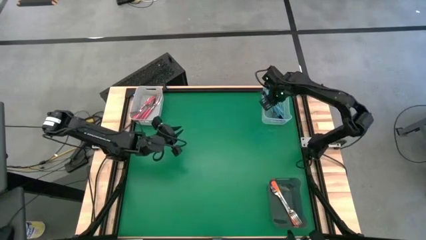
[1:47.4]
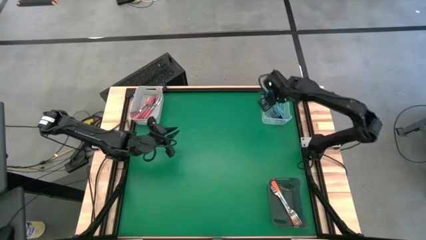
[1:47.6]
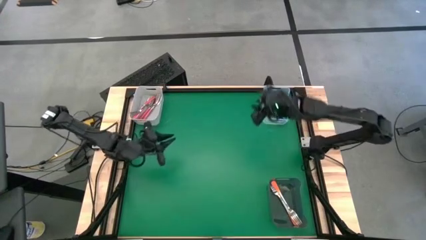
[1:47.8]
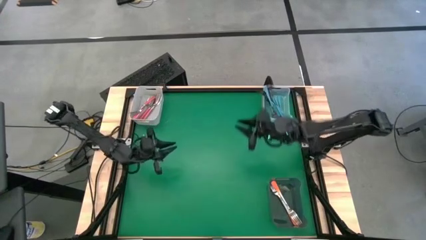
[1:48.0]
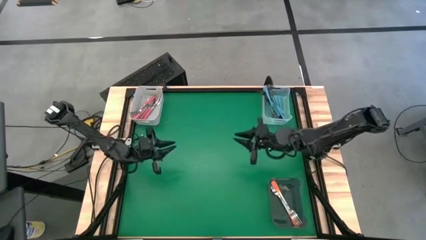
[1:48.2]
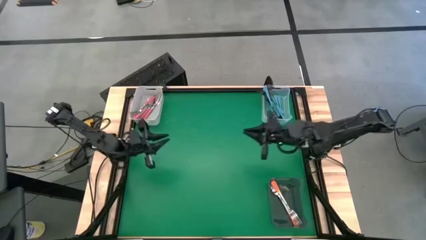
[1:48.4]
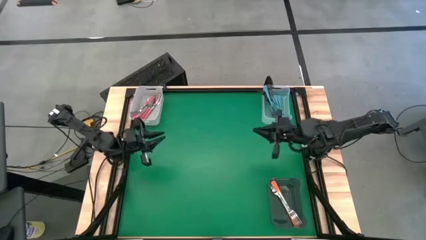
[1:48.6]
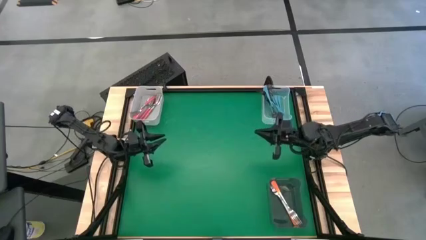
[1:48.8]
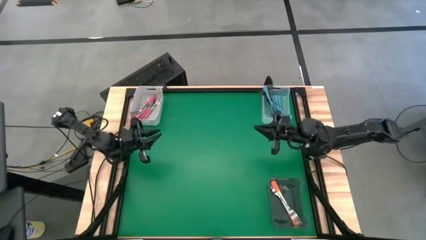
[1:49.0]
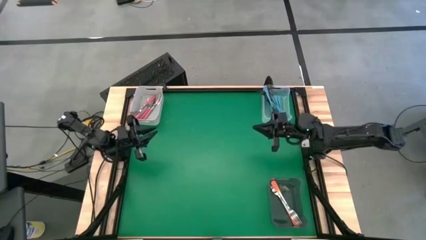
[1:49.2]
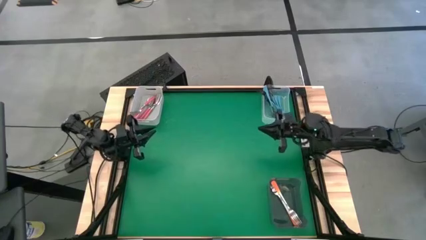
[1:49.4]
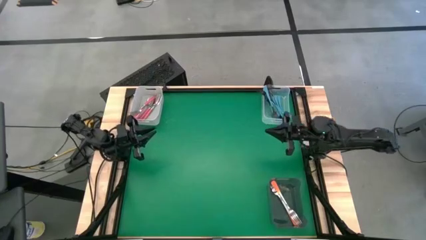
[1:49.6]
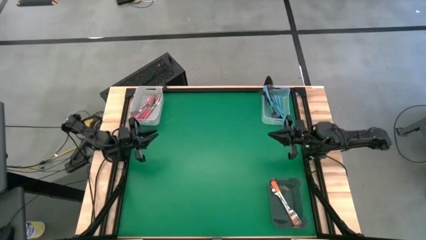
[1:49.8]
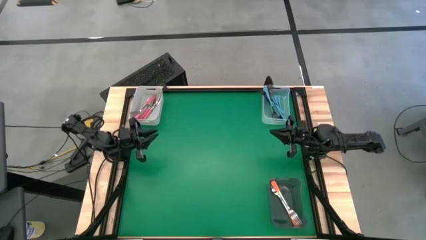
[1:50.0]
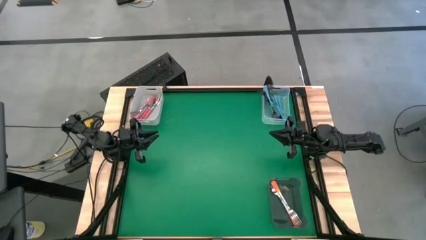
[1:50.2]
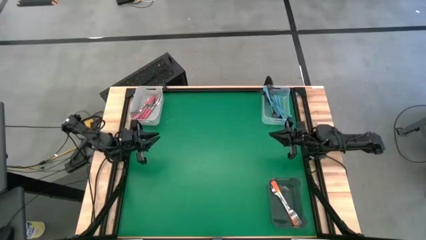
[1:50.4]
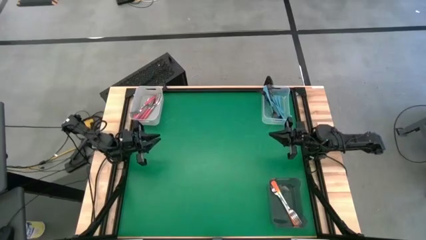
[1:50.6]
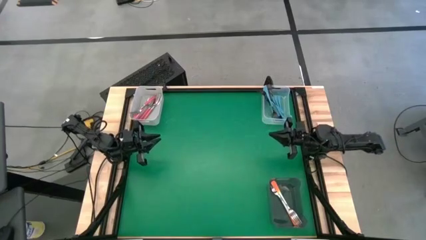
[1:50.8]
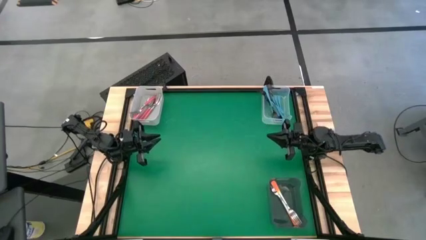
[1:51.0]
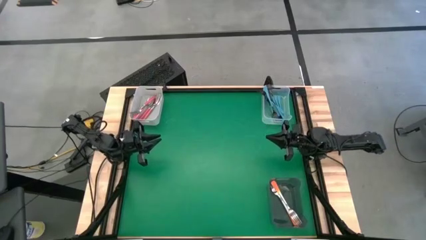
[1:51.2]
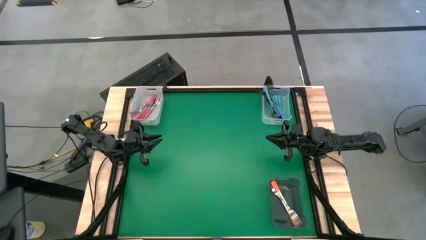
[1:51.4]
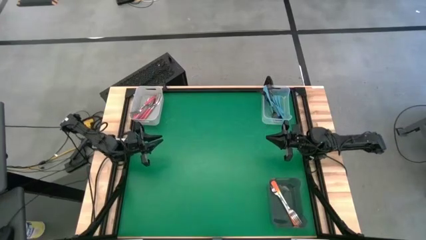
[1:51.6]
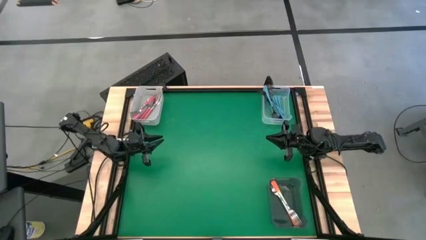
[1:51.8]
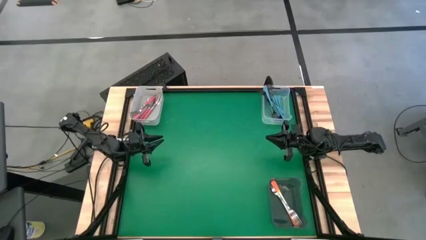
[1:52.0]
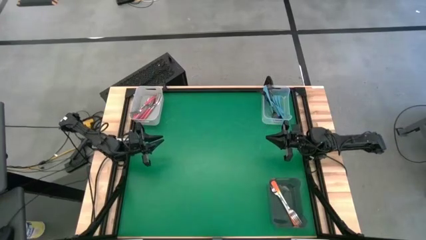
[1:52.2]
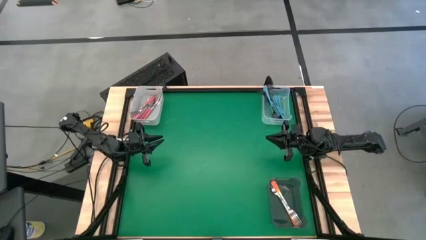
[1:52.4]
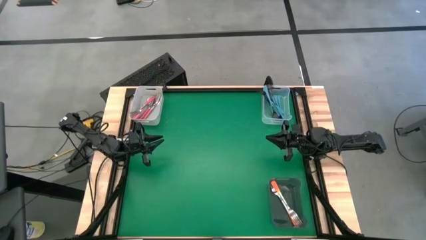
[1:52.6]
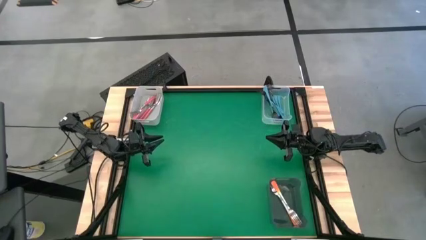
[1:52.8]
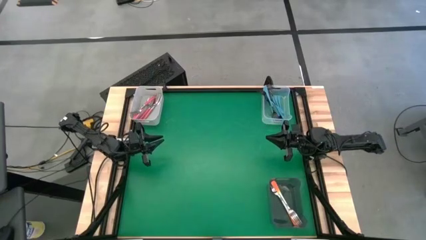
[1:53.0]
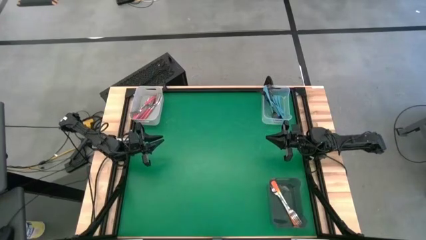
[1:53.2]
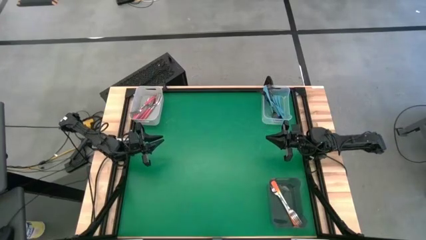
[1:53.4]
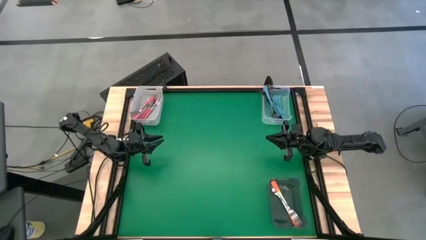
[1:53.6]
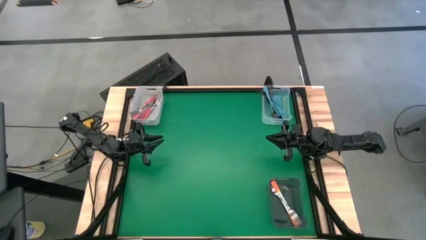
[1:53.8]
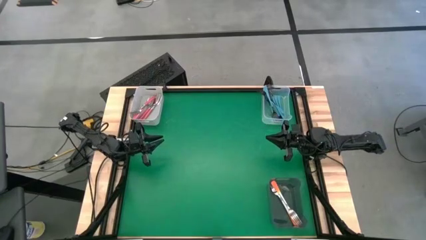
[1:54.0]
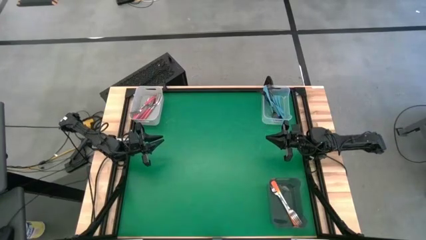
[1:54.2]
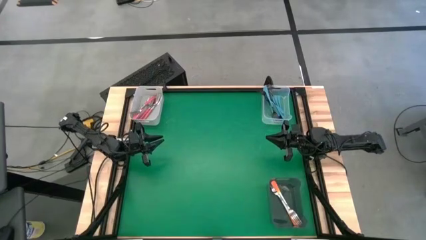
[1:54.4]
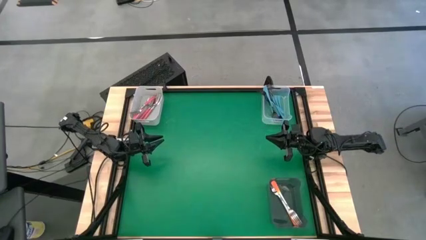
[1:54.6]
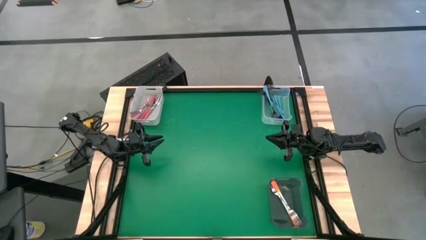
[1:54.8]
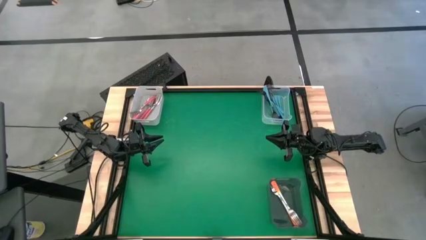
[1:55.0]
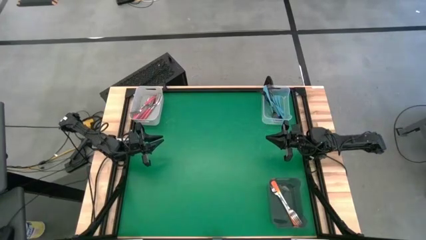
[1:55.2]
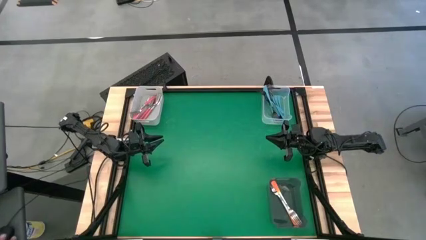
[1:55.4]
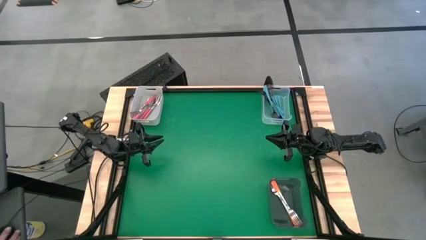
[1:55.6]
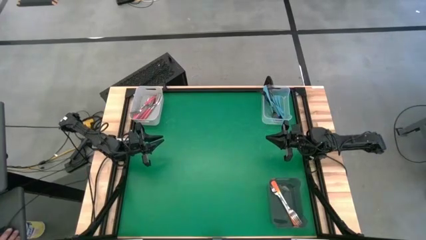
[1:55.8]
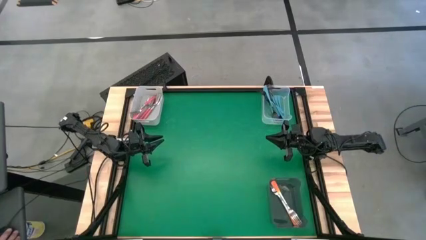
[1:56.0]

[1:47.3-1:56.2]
Task: Sort silverware by color (type)
Return to Home Position

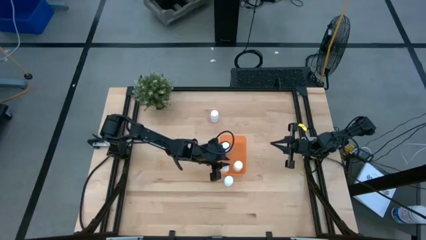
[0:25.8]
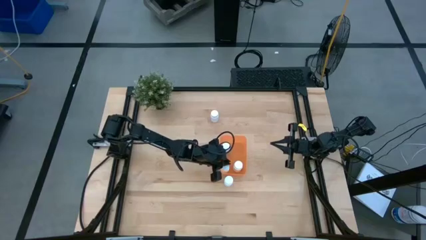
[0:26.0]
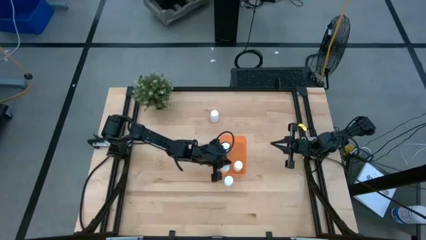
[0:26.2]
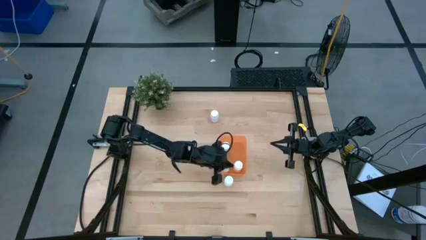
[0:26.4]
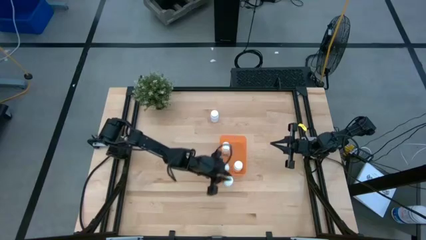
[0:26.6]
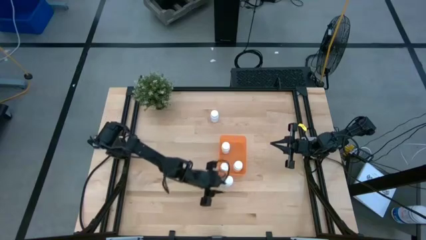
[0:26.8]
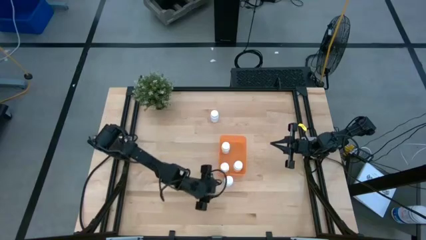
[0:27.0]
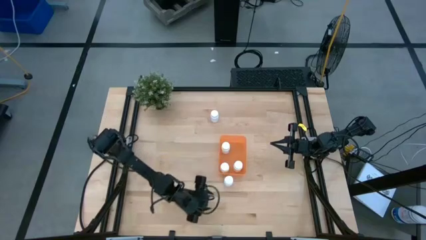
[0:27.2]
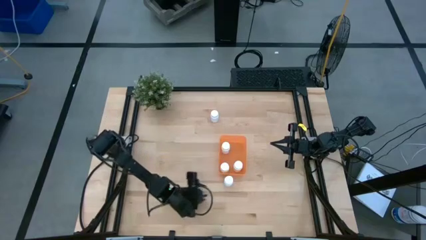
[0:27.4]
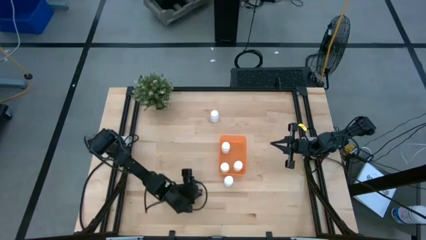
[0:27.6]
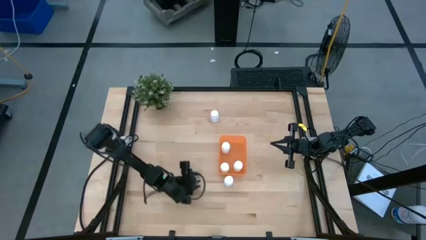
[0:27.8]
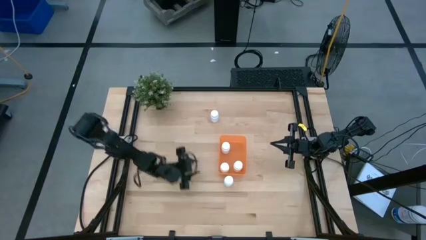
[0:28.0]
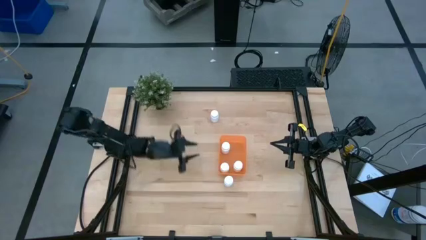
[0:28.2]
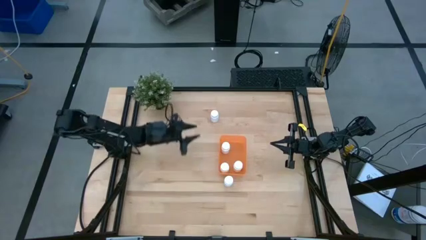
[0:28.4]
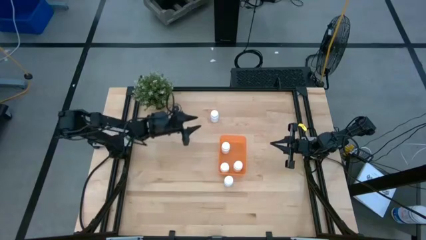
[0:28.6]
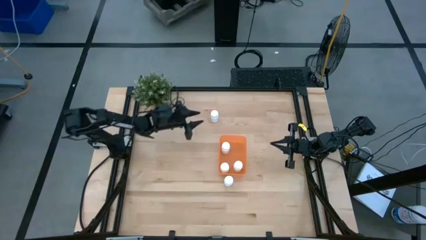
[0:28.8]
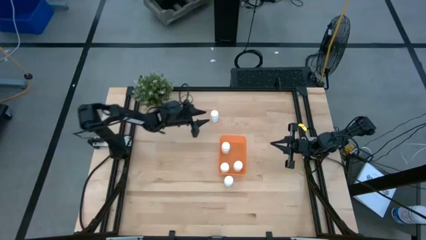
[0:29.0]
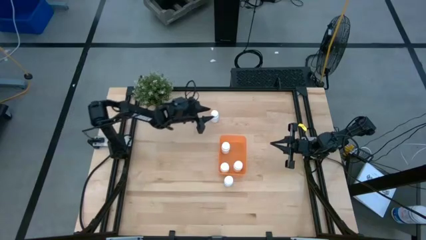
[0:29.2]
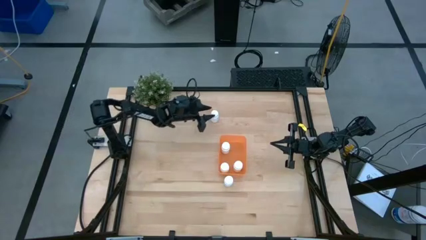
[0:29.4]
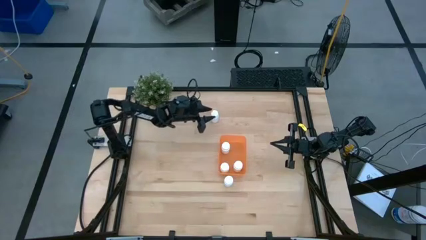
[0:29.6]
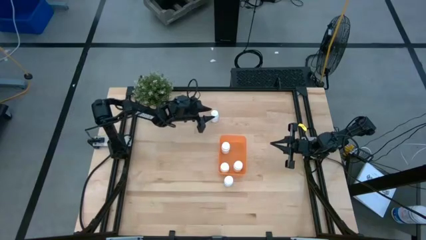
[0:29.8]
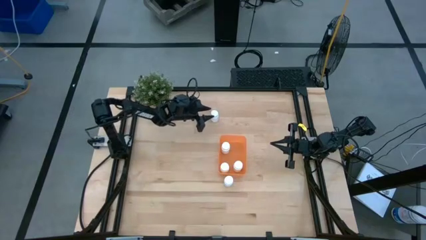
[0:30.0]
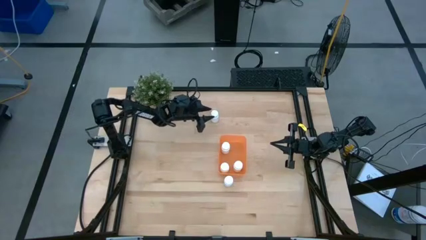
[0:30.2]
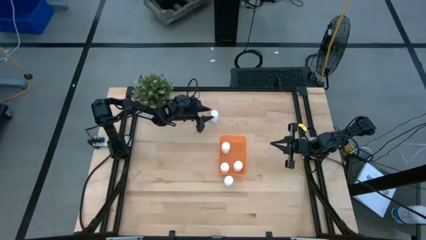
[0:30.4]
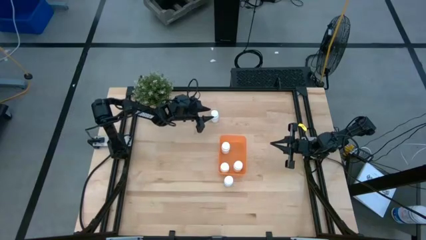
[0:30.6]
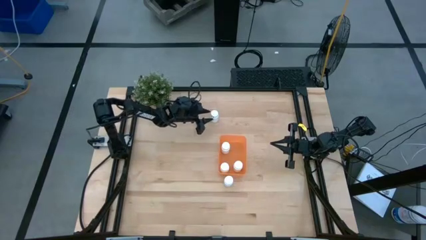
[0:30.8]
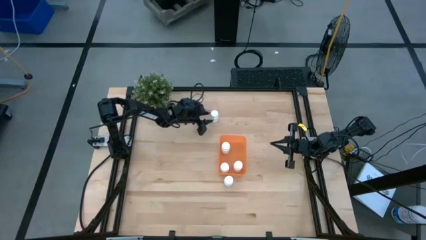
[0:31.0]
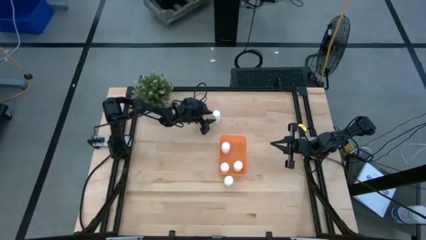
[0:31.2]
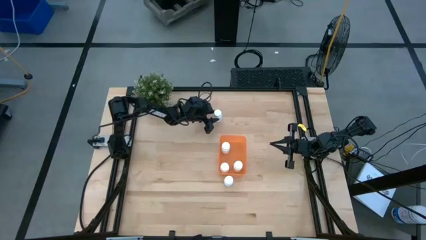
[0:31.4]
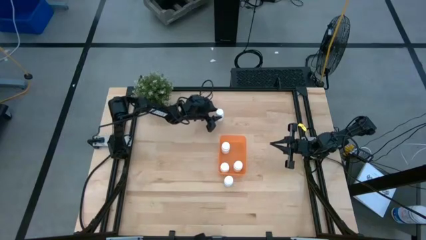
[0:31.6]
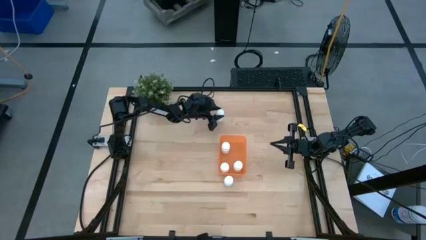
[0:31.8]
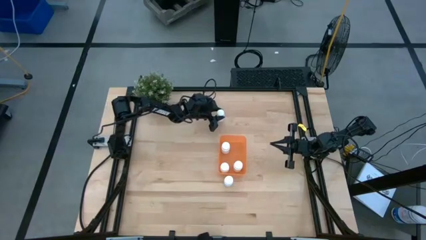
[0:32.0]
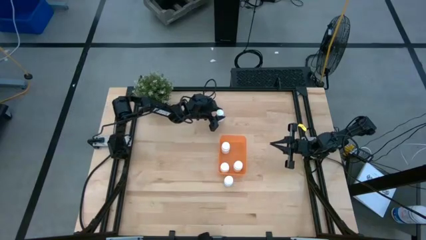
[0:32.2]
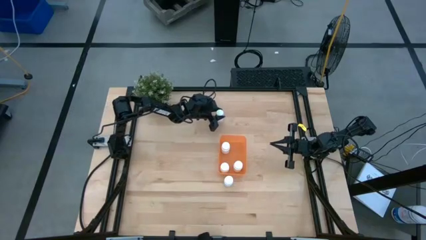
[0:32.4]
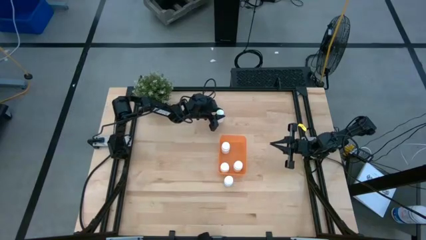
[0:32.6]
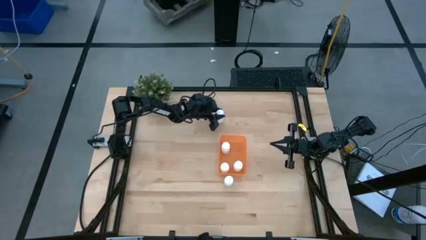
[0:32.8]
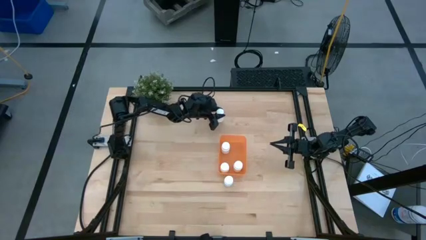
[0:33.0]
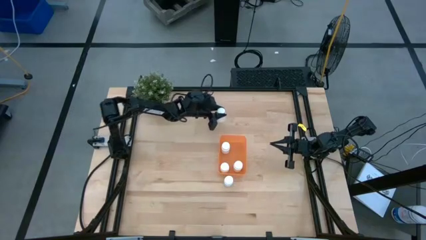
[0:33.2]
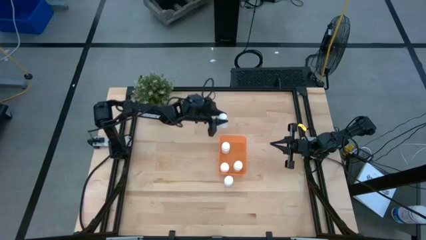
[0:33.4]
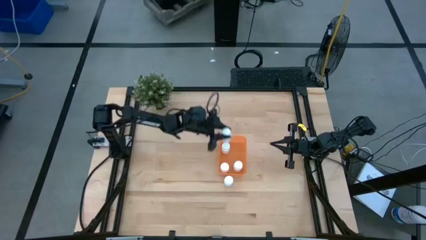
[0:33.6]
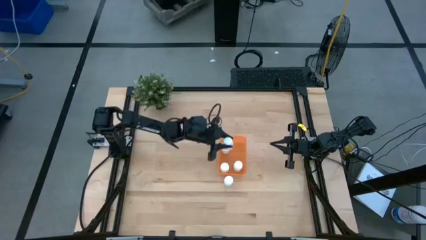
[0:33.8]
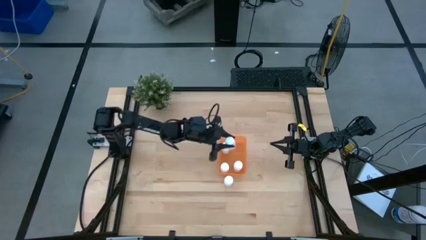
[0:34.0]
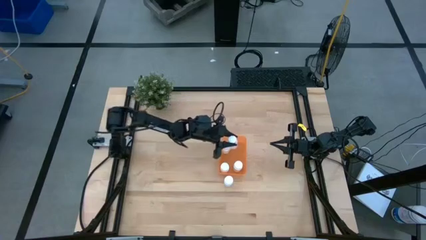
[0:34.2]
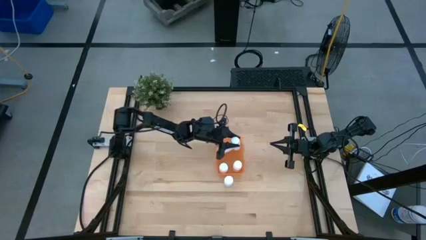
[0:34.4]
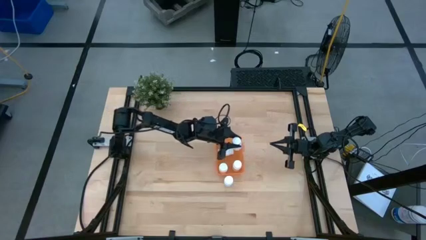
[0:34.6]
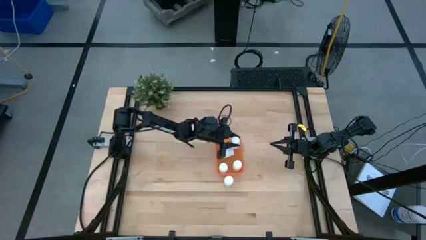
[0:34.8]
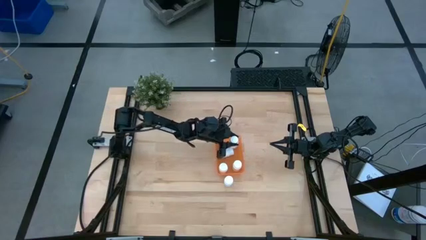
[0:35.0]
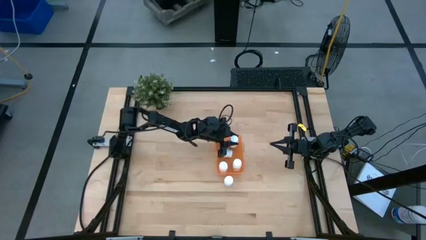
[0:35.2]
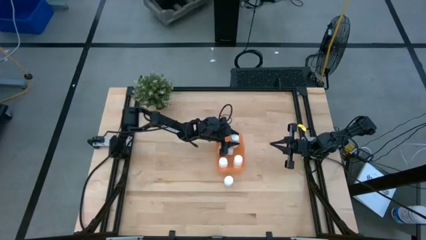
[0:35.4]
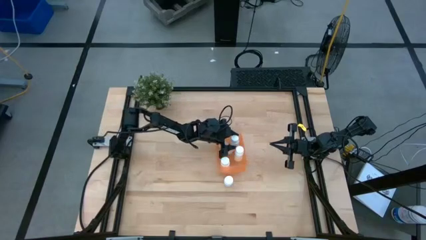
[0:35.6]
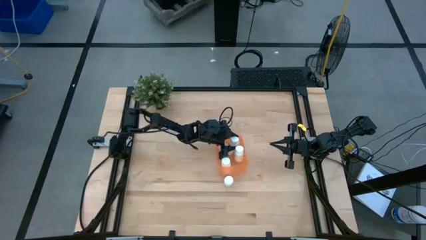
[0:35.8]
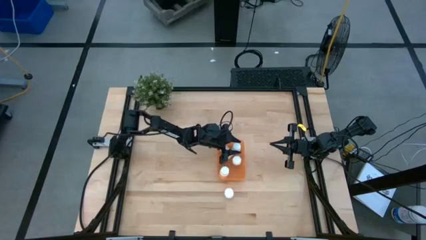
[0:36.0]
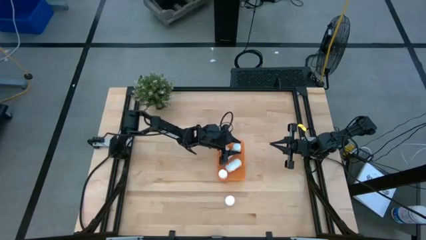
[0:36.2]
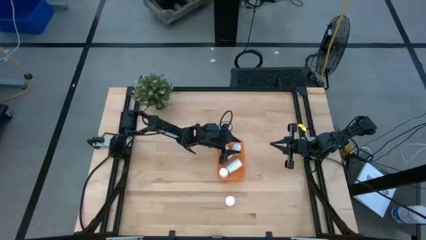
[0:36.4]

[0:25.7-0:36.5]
Task: Pick and place pill bottles into a basket
Put the top white medicine bottle into the orange bin
